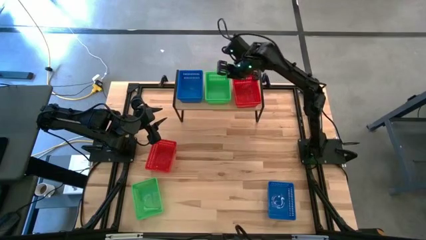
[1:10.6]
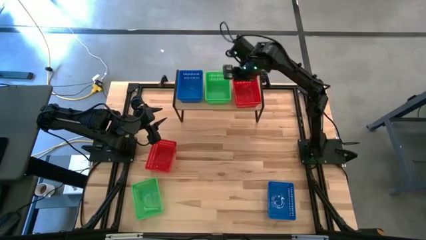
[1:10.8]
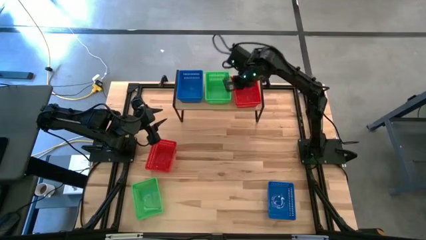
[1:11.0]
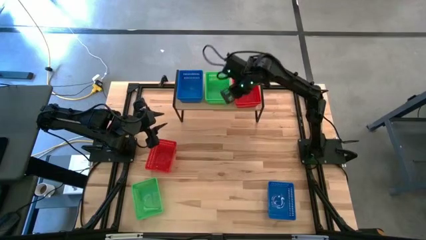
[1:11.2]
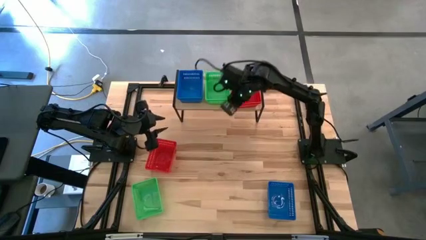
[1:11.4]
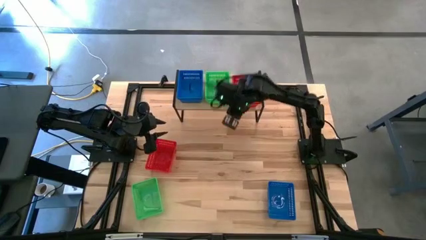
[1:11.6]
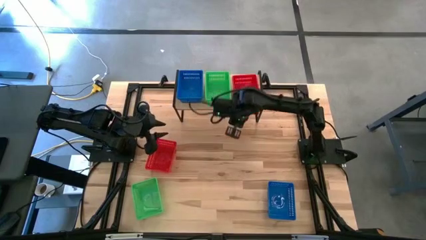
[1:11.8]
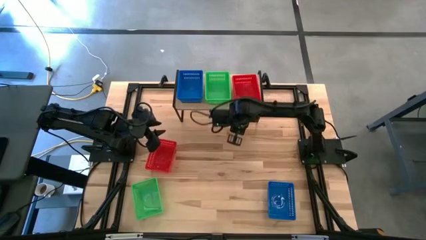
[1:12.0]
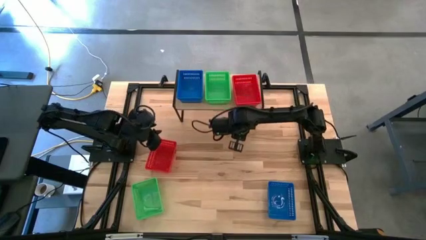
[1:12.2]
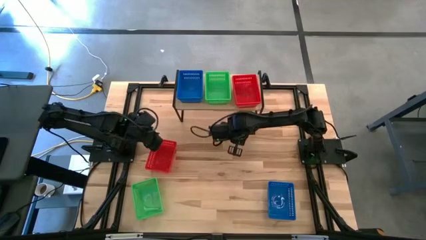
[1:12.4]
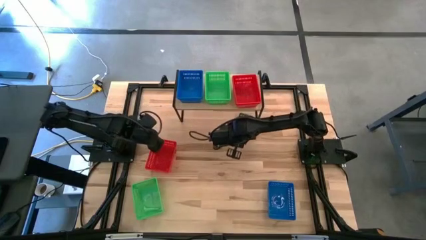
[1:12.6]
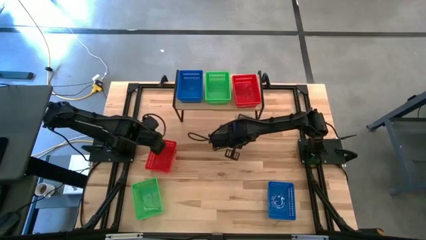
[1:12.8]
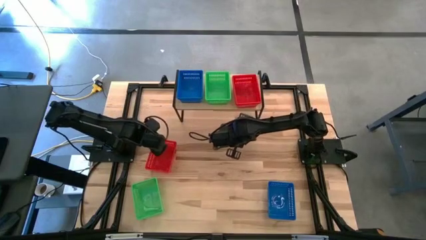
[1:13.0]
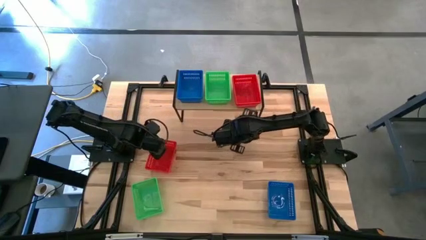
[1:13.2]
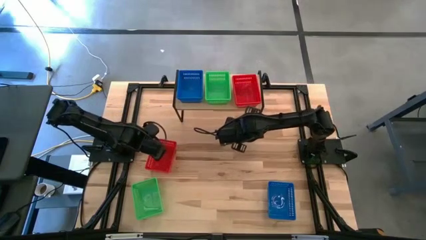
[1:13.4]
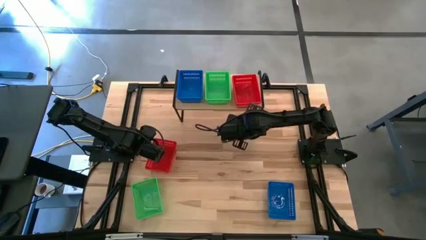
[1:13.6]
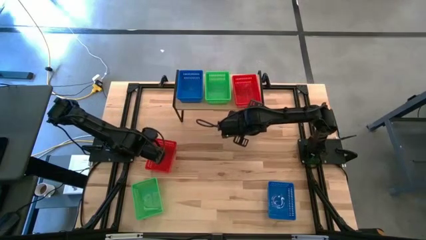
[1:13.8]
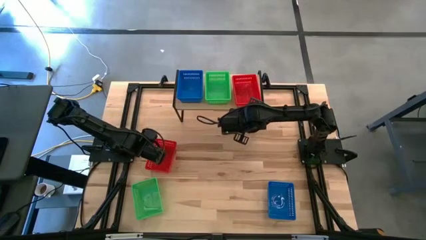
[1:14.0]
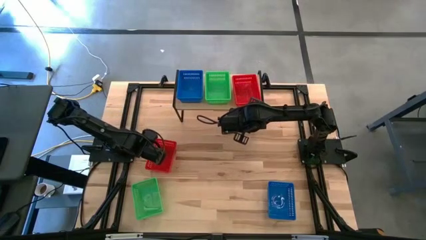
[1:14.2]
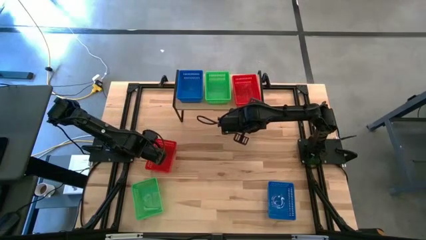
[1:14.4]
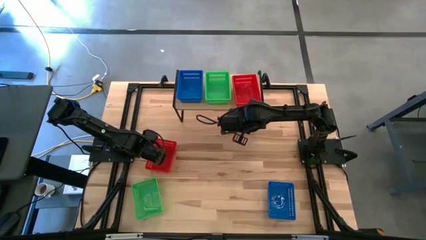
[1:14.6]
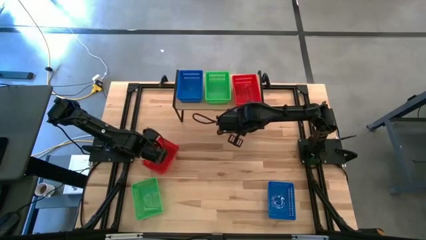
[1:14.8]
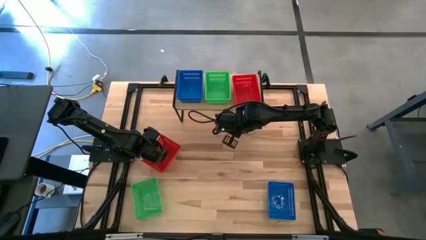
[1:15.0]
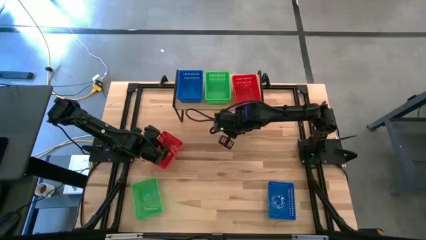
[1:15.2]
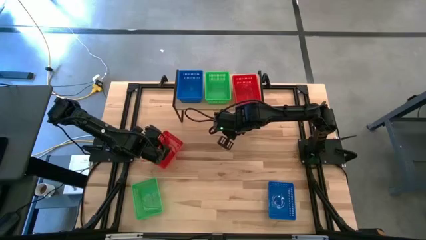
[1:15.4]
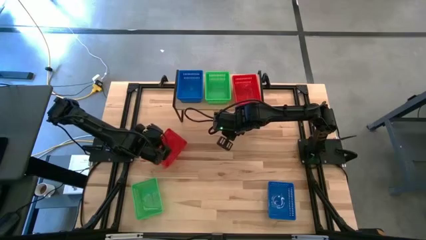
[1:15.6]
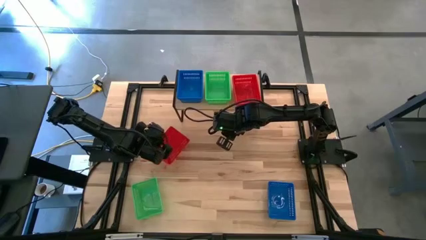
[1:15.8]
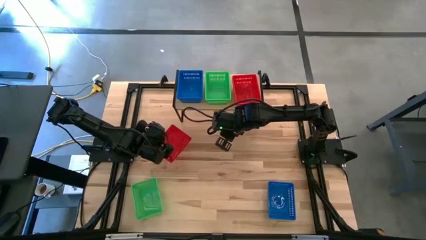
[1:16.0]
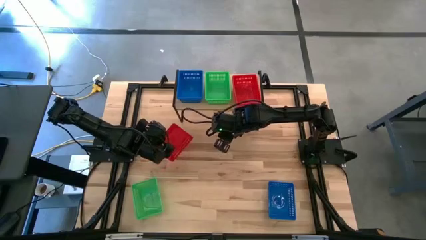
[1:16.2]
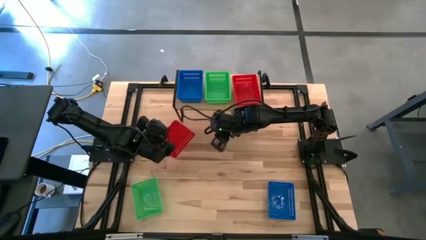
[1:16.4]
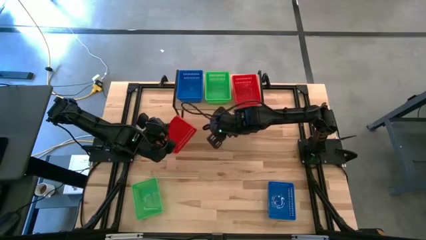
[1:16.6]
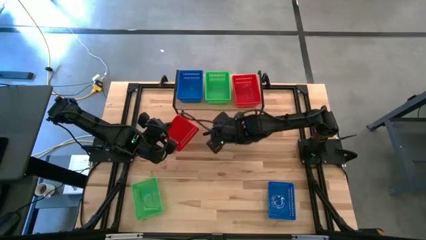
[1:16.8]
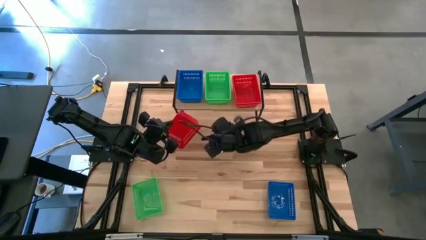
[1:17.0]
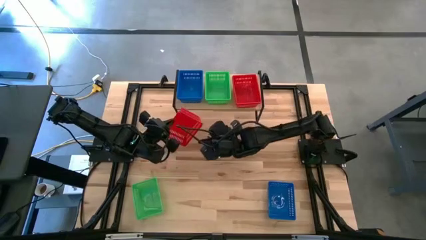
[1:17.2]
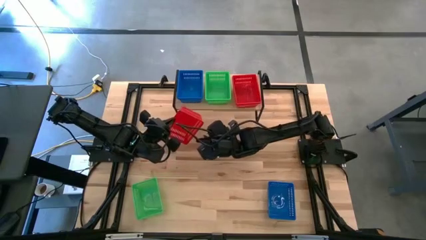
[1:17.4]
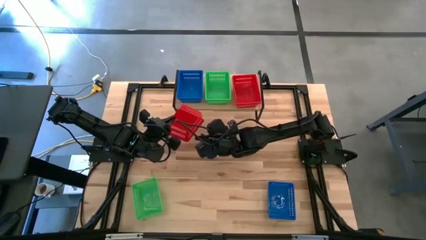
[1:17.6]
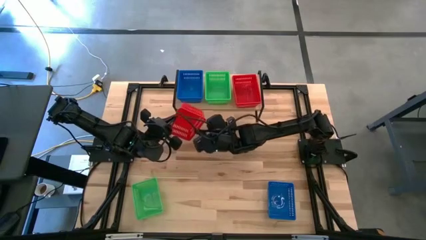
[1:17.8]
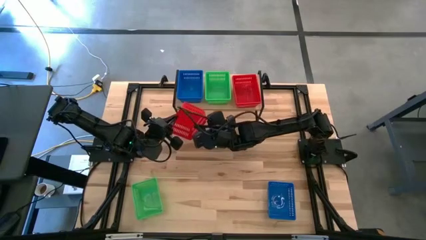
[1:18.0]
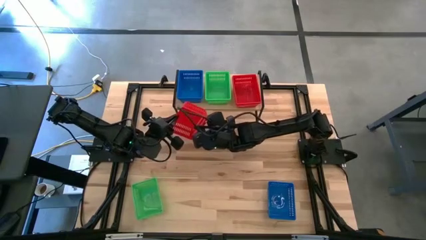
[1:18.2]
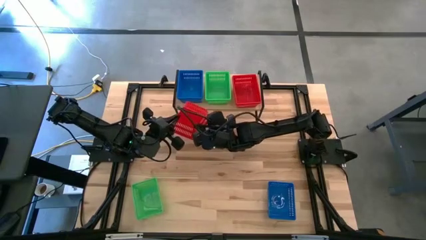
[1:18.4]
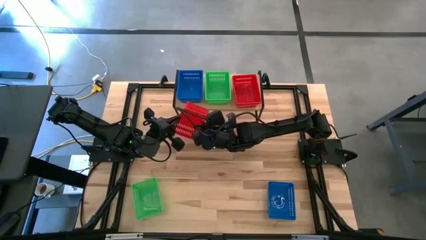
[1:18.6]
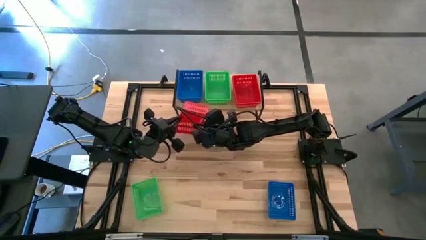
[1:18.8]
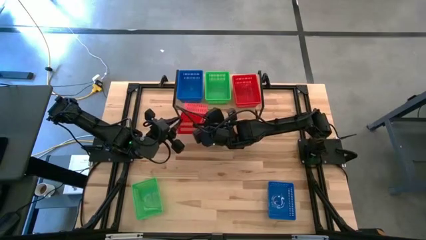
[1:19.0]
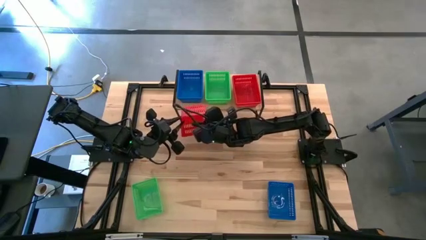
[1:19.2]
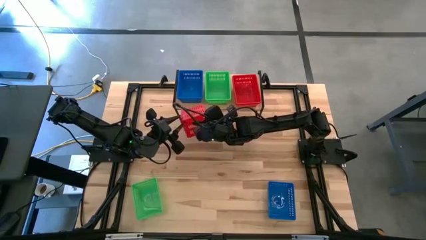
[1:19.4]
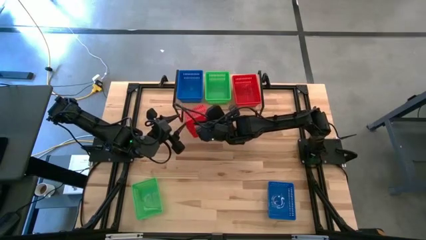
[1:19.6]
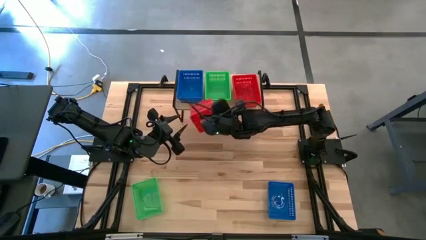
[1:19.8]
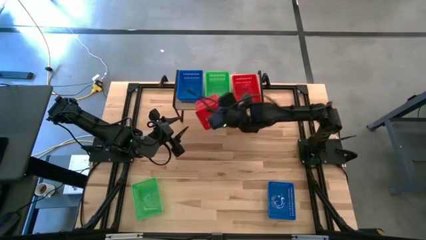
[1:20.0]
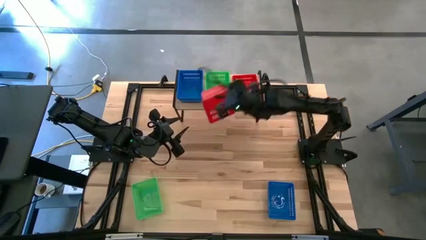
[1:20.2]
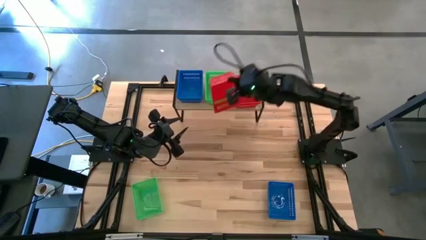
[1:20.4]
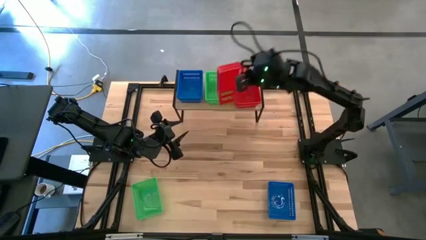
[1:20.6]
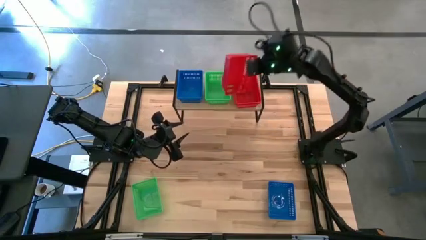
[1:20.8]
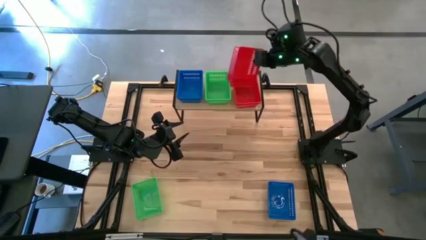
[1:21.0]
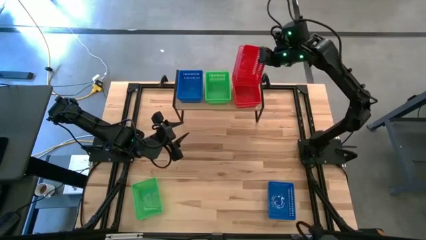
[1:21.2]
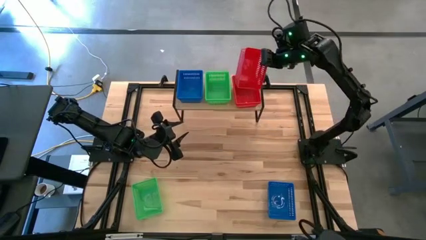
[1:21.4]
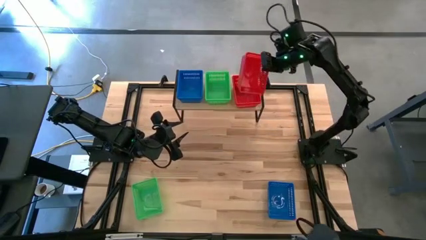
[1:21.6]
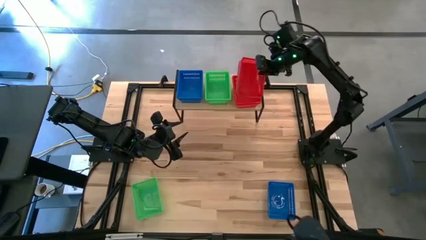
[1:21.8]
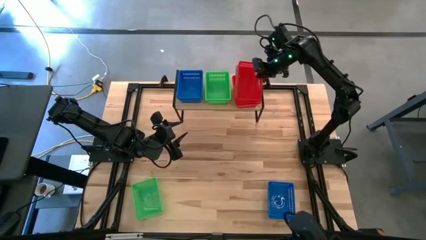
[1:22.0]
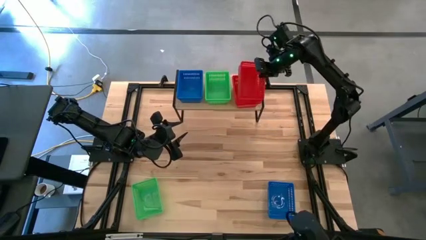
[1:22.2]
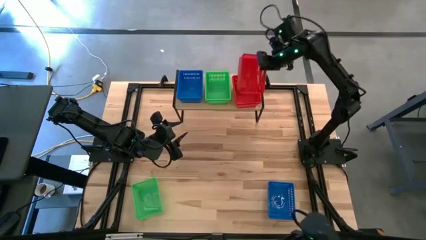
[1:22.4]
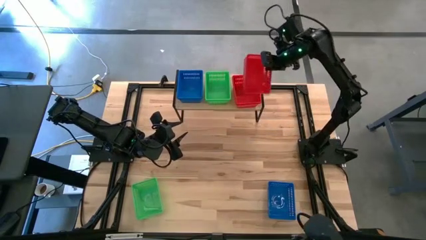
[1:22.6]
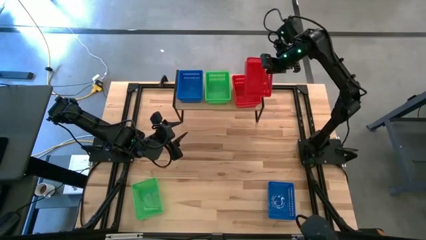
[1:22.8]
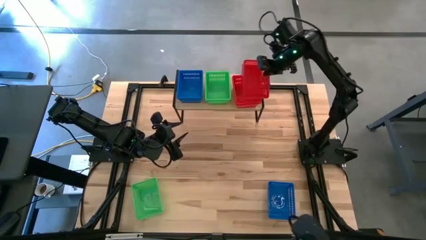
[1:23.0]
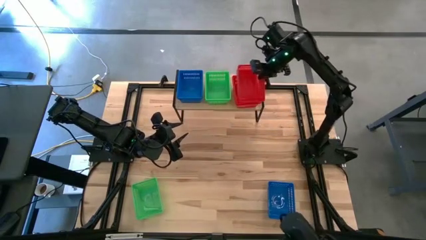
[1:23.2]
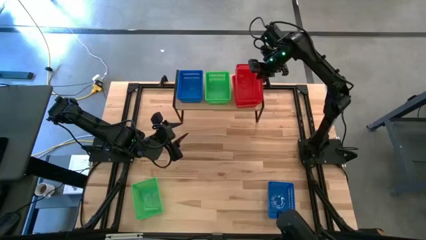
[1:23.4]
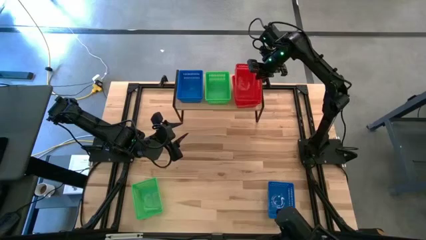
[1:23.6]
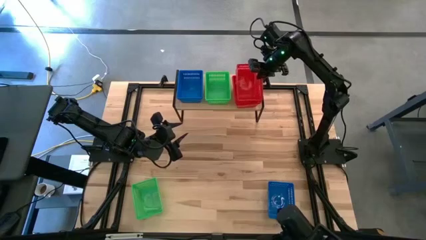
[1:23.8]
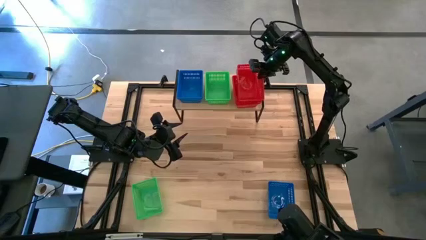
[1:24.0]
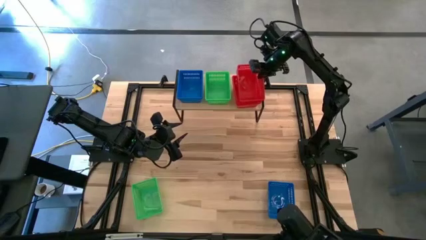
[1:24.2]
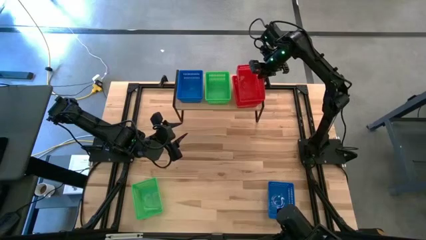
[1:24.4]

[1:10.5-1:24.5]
Task: Stack baskets on shelf by color
Stack the red bin on top of the red bin on the shelf

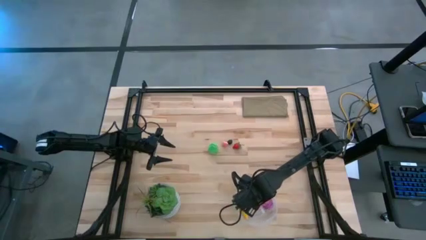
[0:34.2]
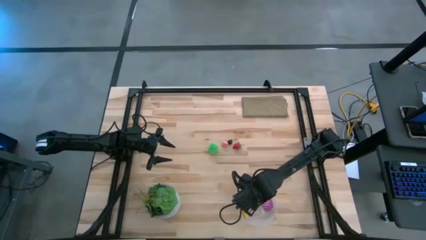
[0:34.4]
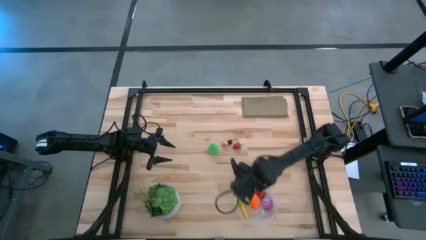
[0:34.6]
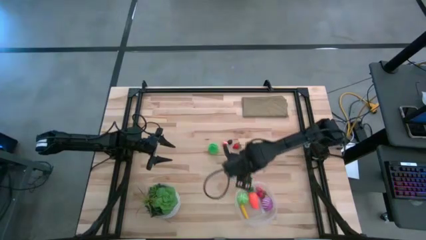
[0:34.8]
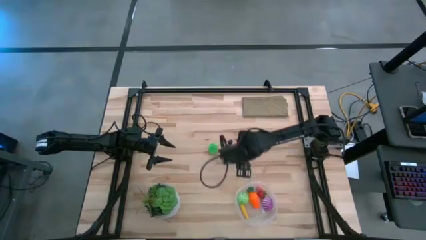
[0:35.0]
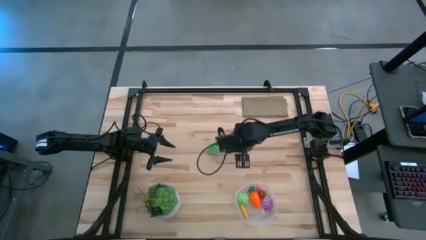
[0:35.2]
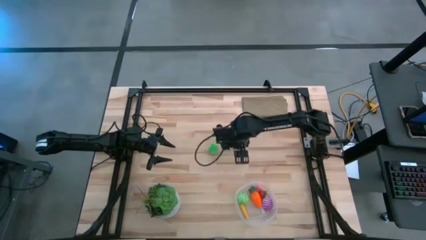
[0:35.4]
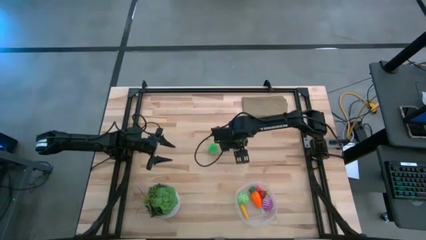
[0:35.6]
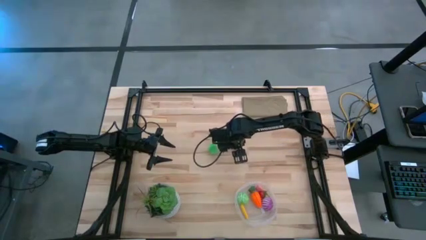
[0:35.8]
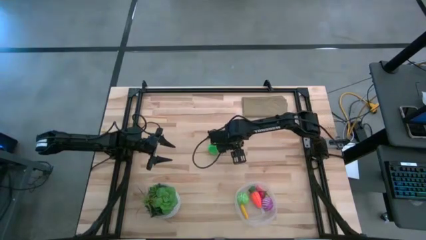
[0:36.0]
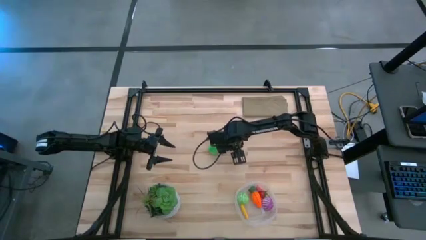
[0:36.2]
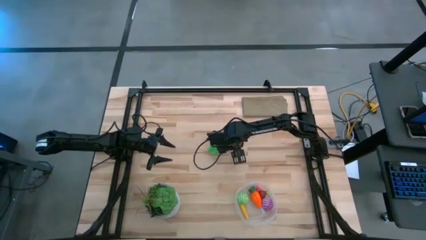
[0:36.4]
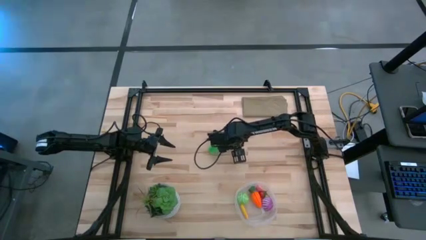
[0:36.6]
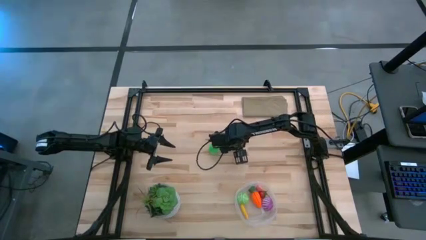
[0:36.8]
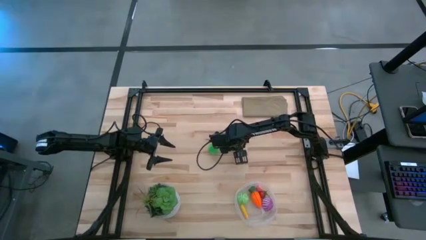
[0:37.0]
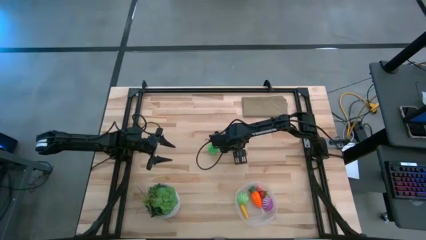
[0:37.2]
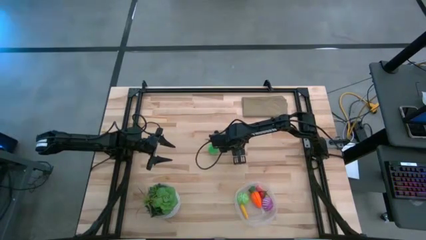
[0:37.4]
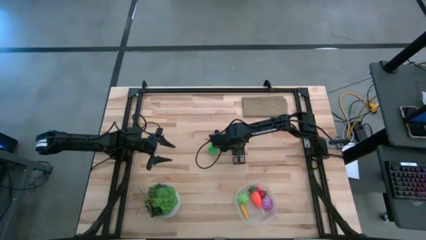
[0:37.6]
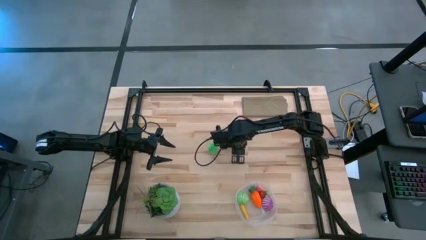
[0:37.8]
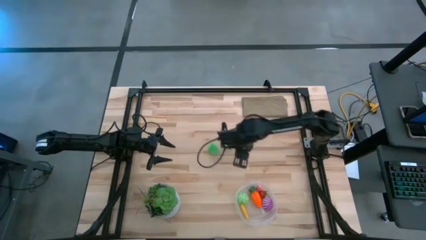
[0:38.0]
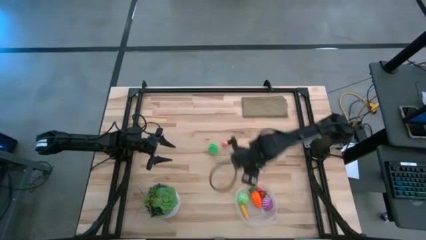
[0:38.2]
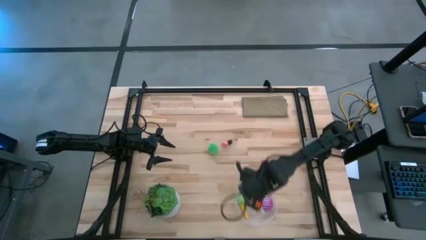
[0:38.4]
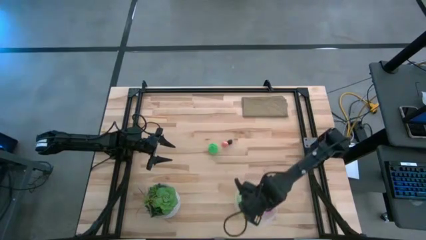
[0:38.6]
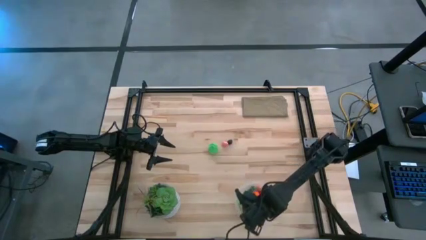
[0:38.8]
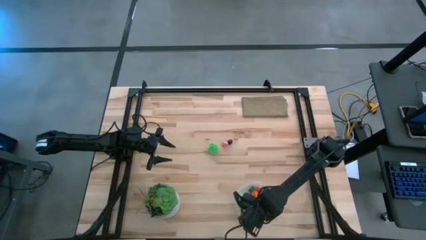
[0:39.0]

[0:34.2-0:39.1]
Task: Pick and placing Produce into tupperware
Put the red strawberry into the transparent container
